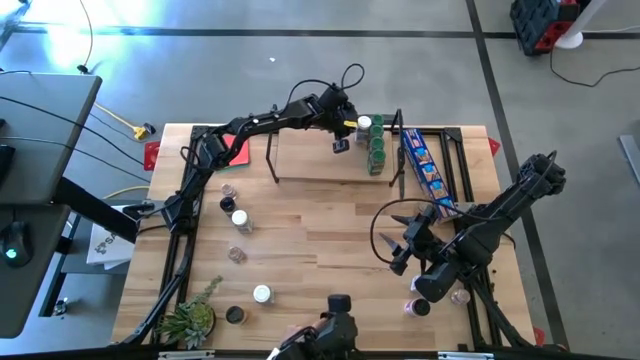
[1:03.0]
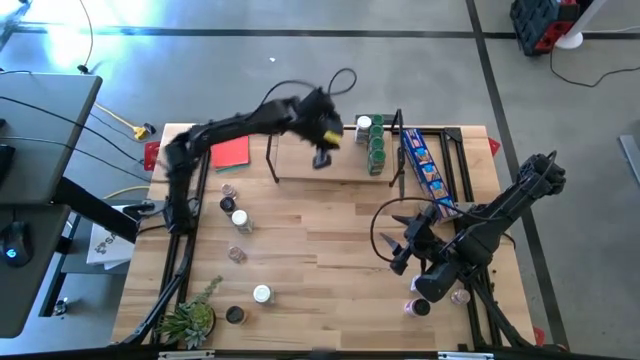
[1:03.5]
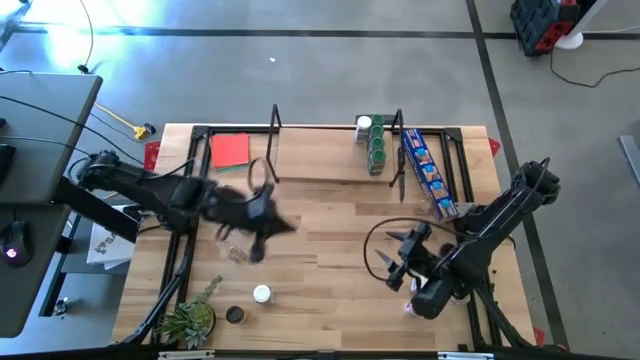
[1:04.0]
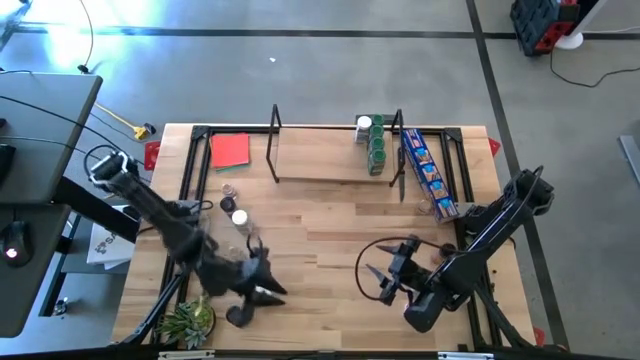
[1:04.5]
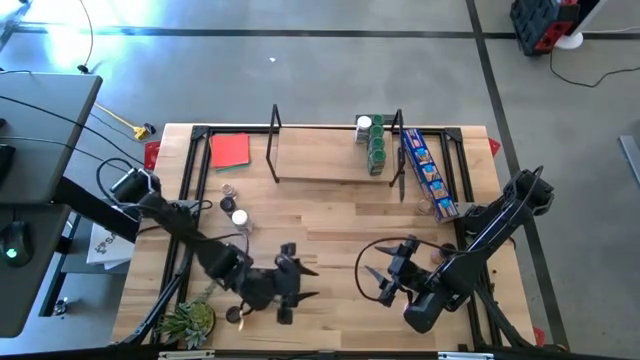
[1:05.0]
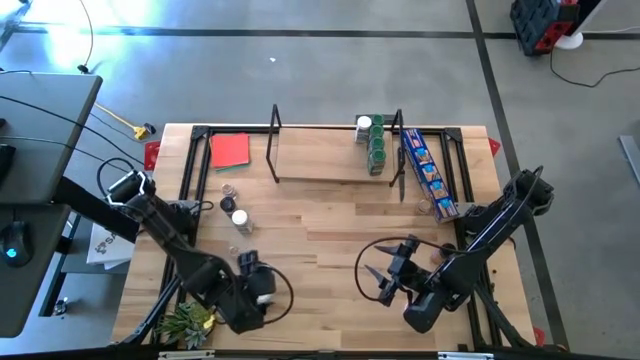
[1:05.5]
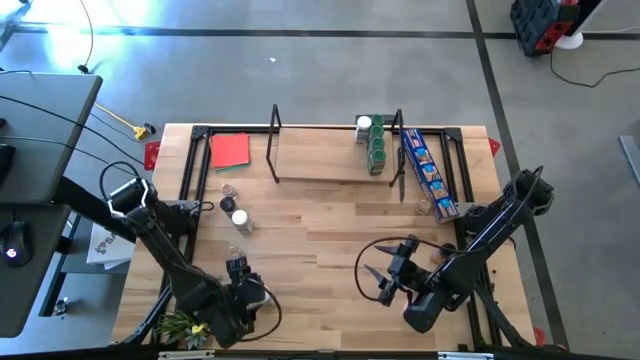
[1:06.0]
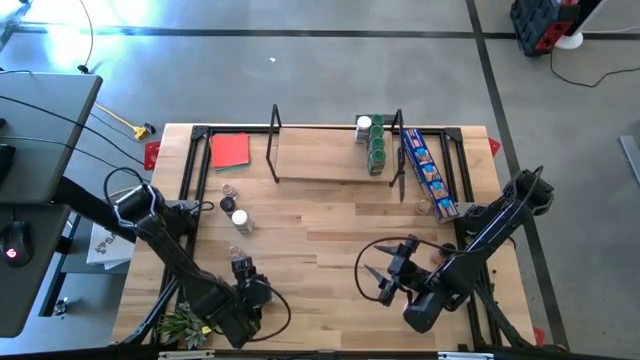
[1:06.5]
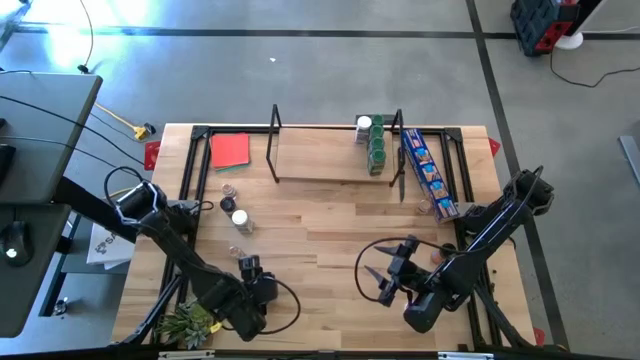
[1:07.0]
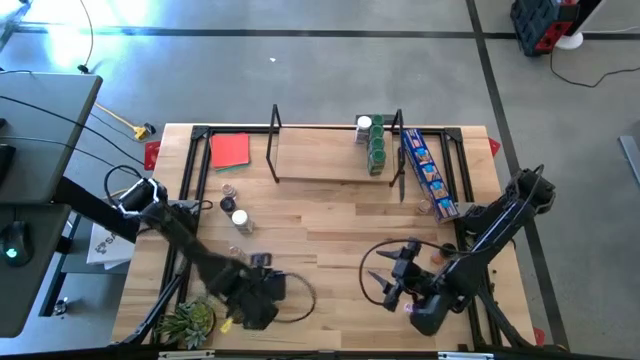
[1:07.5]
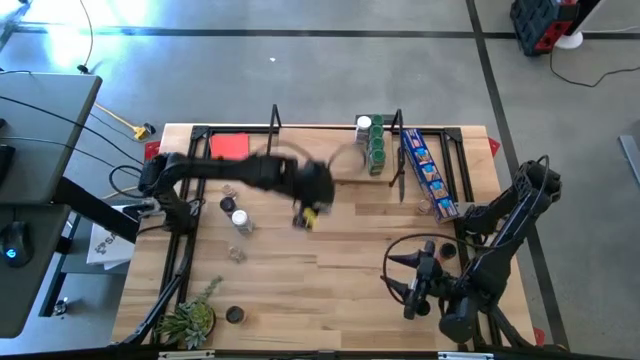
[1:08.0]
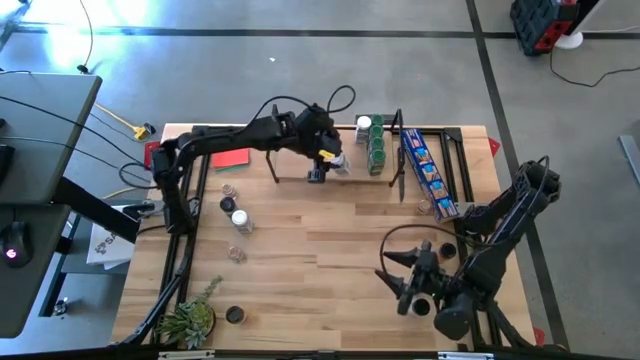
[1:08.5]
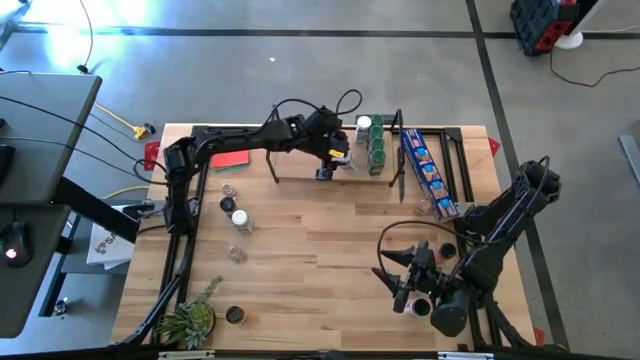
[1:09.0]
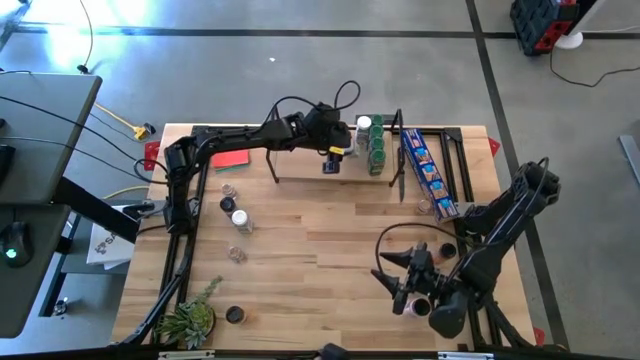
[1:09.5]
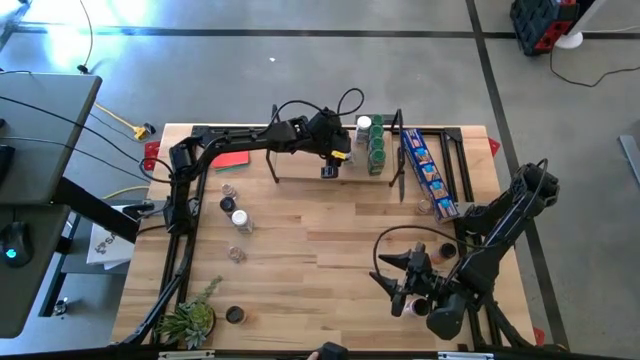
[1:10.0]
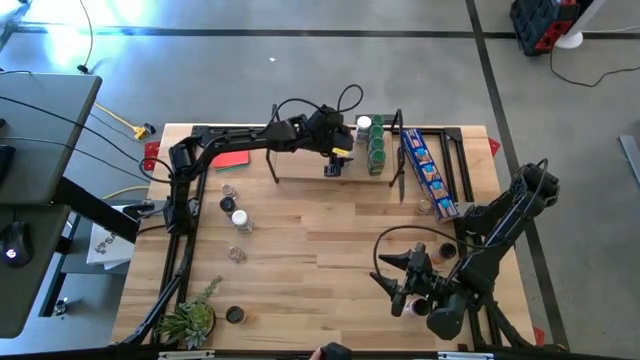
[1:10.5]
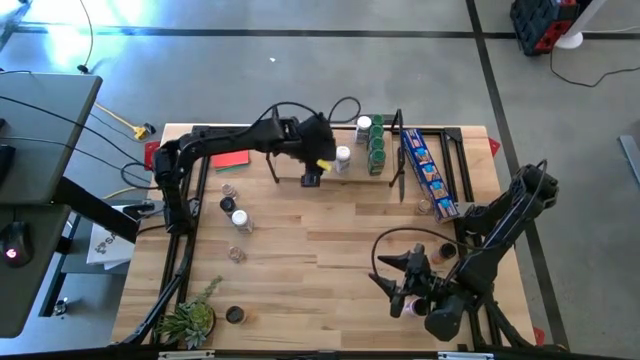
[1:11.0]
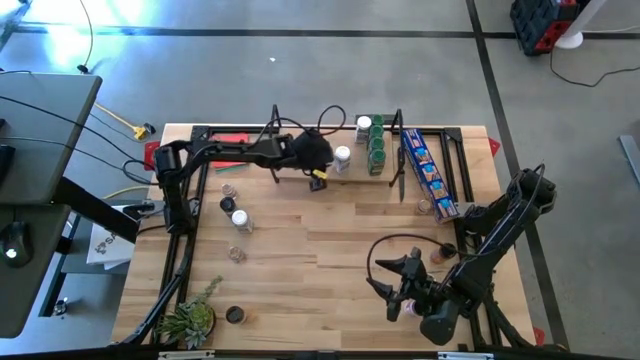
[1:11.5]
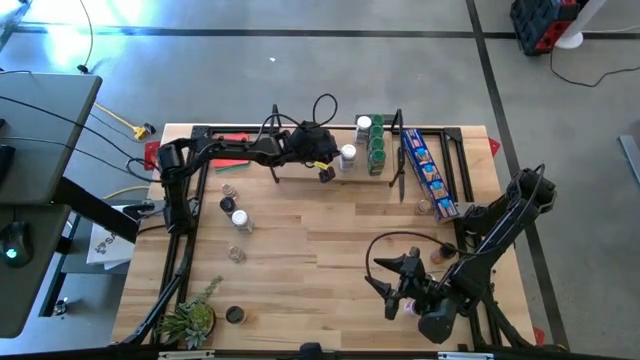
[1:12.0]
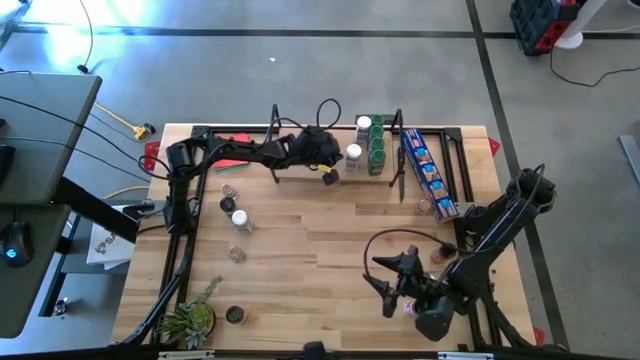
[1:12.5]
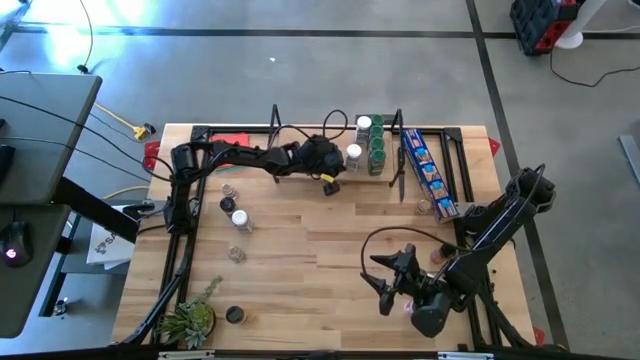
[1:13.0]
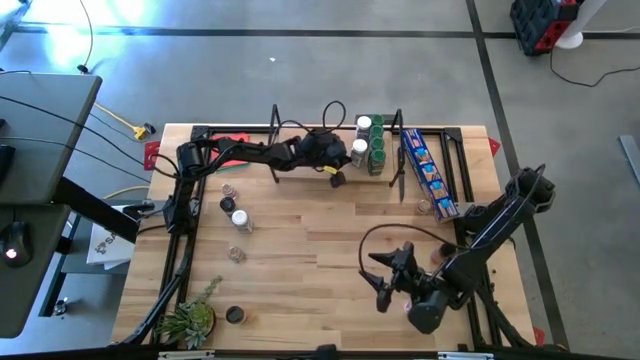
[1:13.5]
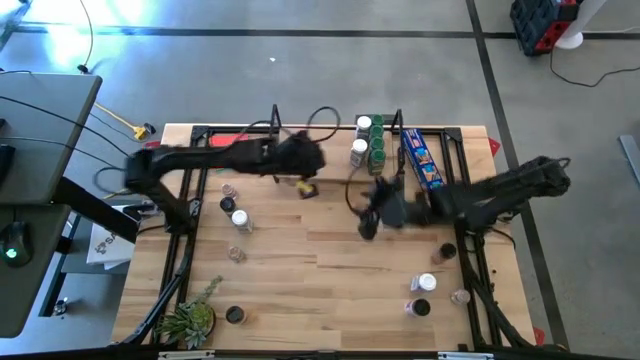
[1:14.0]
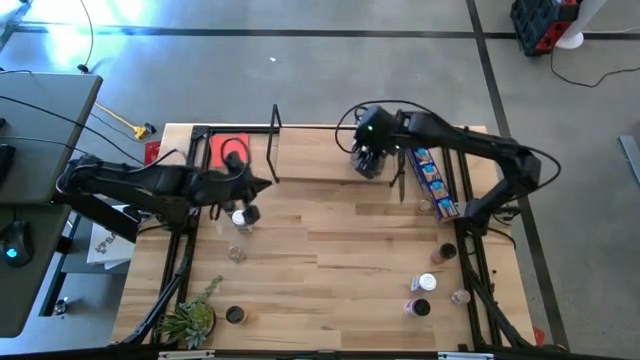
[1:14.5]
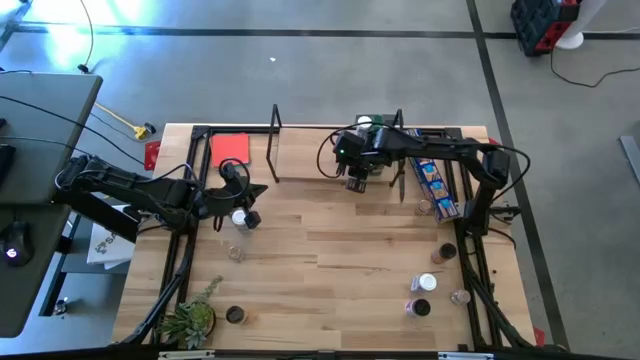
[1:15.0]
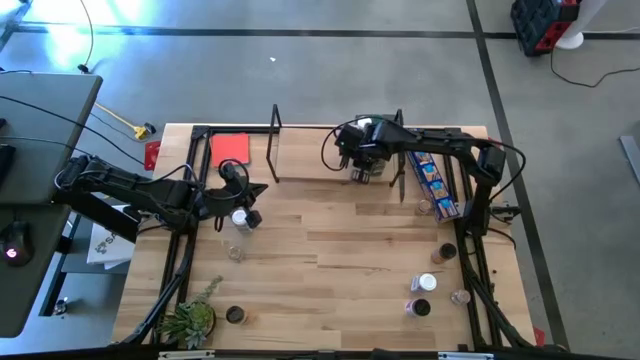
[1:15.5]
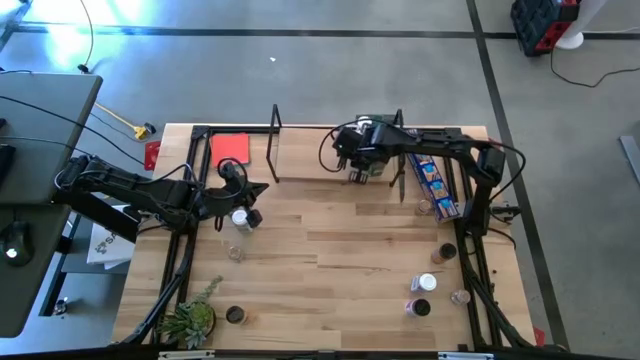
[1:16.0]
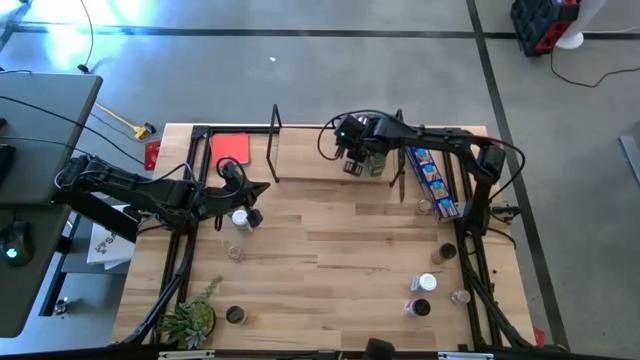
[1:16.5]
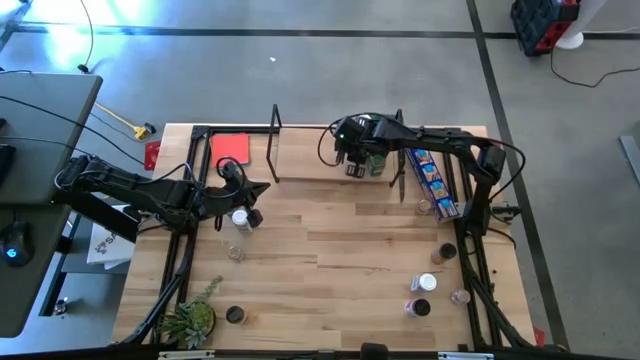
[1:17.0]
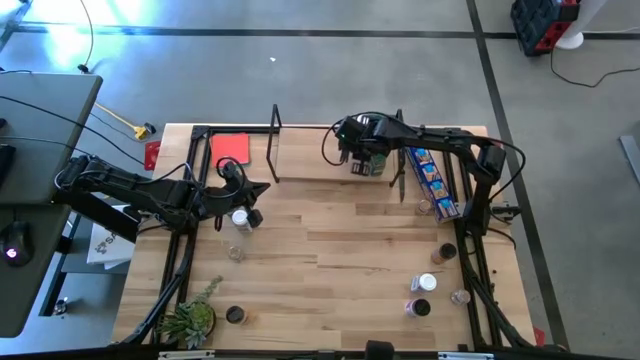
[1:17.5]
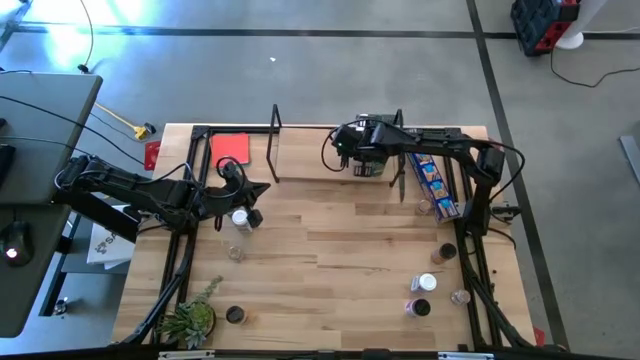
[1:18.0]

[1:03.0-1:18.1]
Task: Shelf spices
Put the bottom left white seasoning bottle on the shelf aligned with the other white seasoning bottle

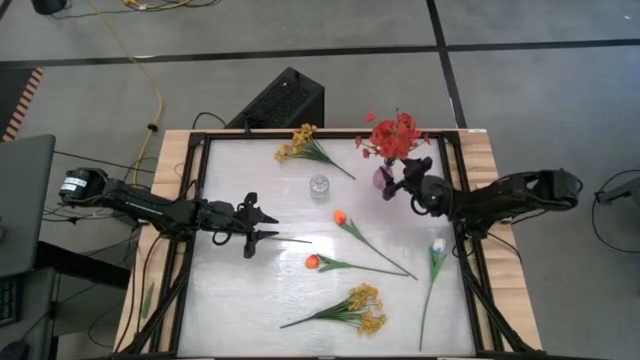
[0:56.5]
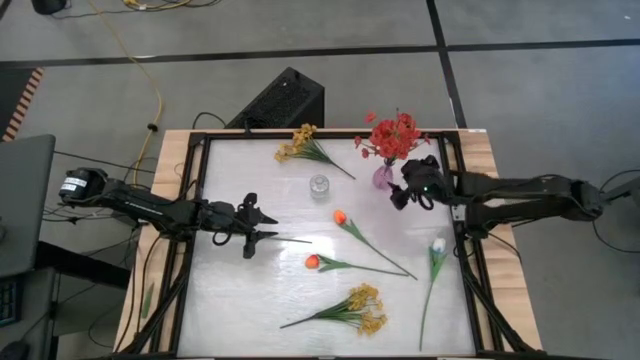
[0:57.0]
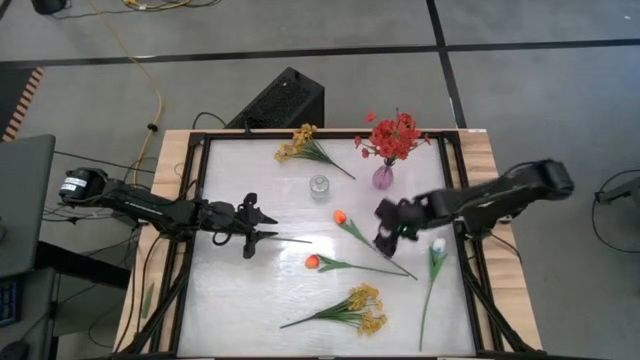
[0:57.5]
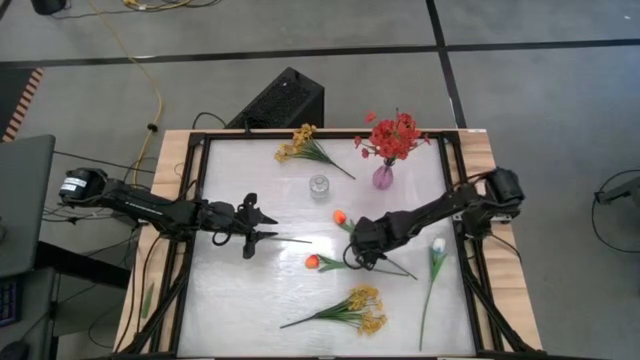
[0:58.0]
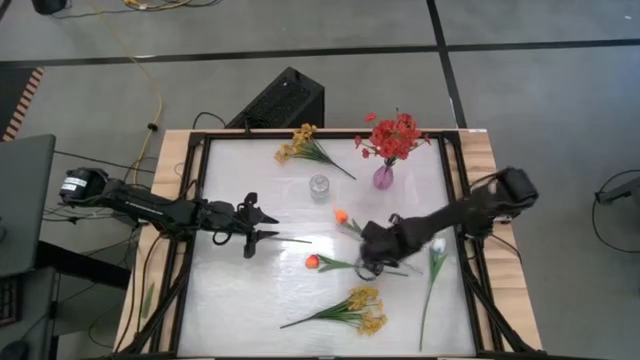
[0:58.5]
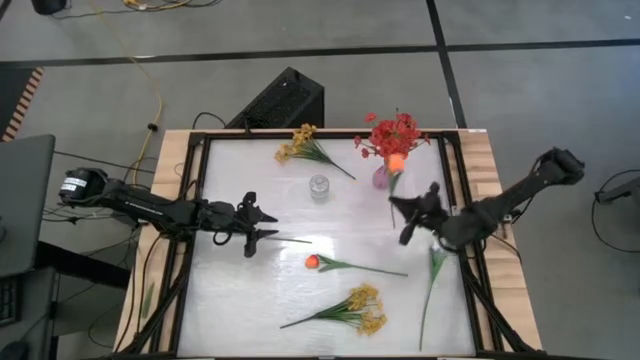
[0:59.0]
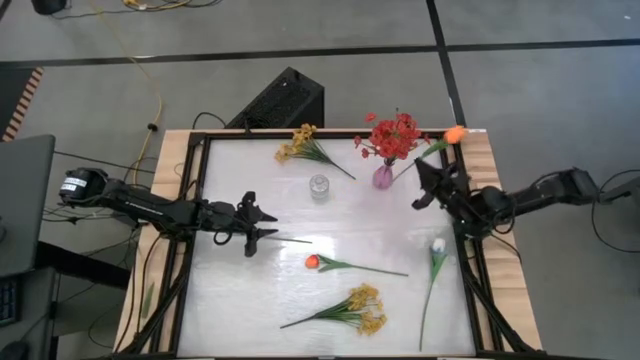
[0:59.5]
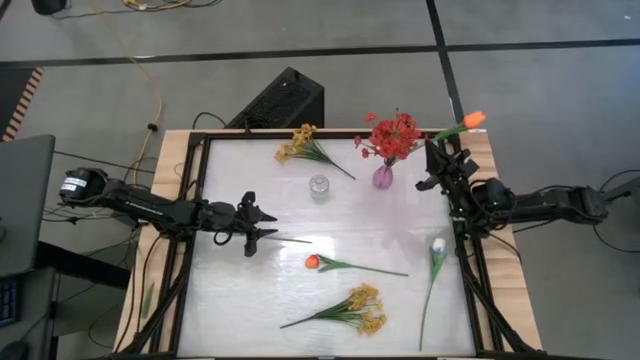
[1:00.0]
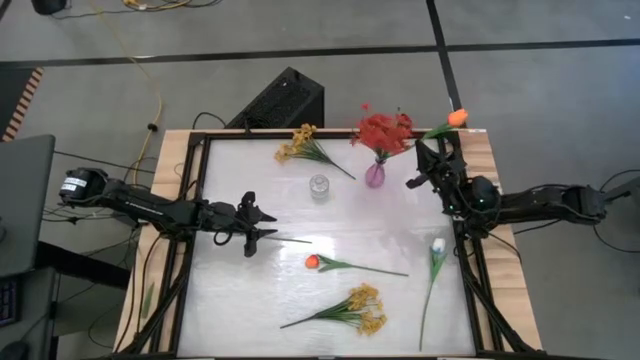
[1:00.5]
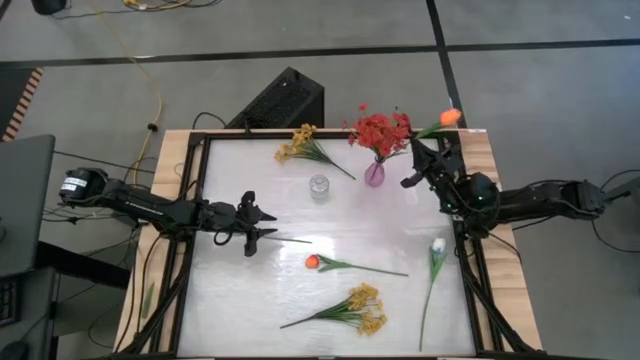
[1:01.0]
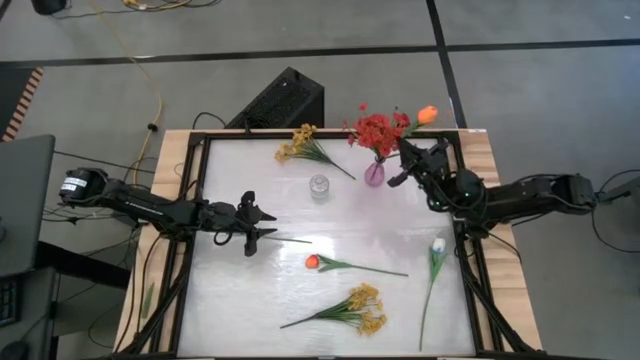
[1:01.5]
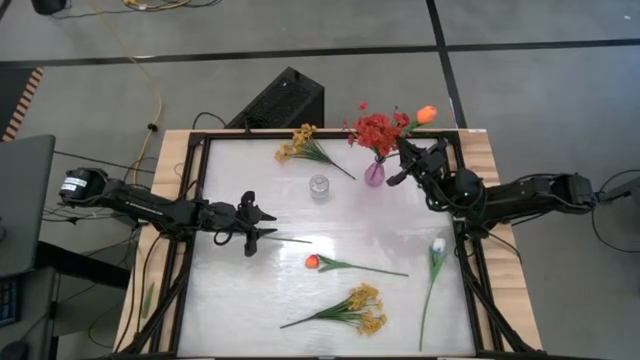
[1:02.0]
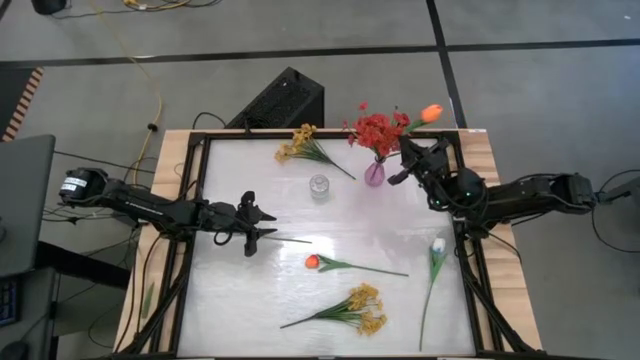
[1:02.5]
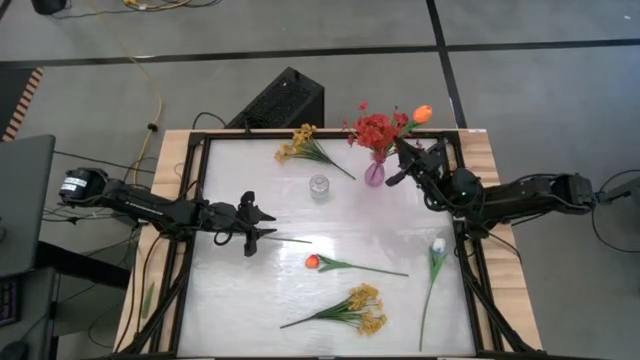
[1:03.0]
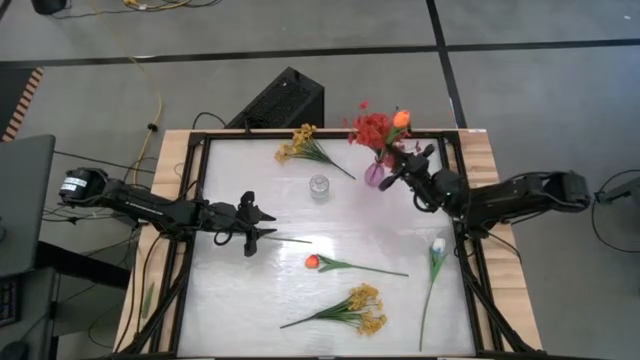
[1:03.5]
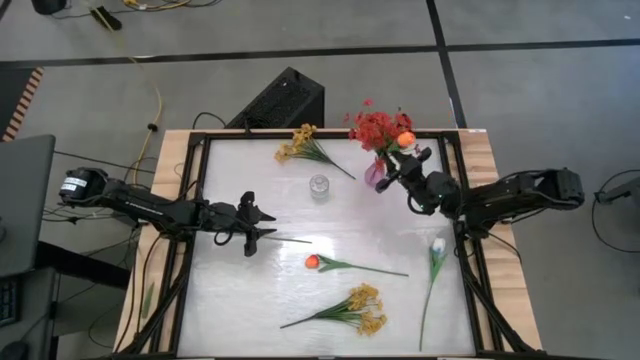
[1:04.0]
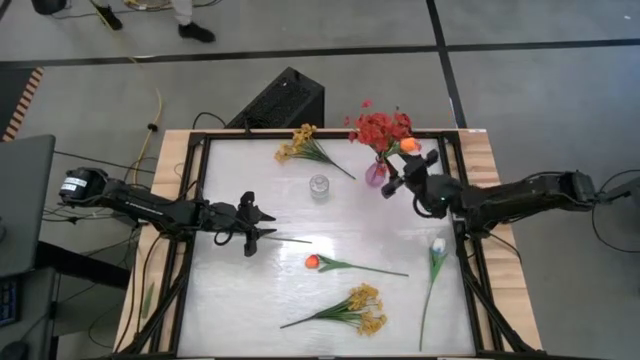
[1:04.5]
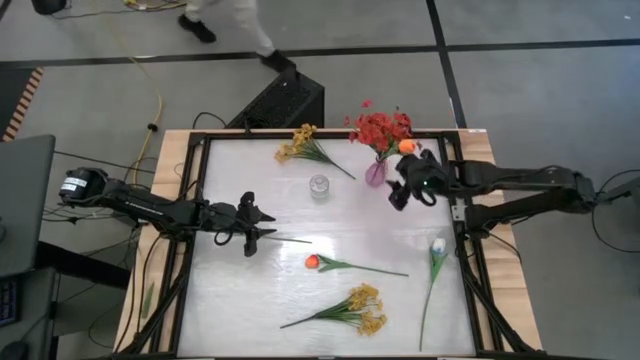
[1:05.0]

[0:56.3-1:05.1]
Task: Sort flowers into vase by color
Put the top orange flower into the pink flower vase
